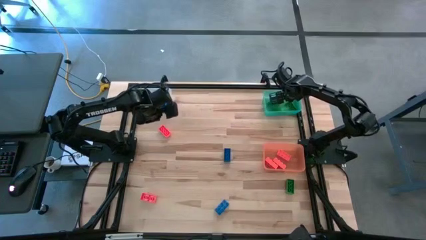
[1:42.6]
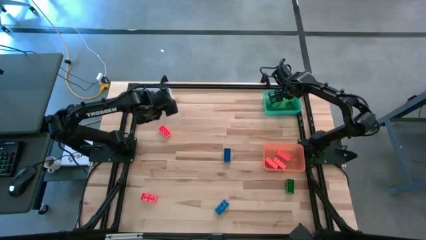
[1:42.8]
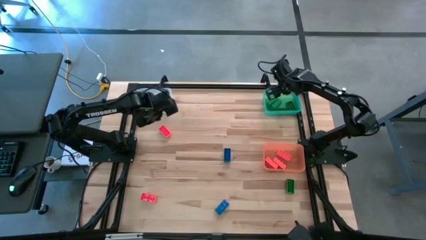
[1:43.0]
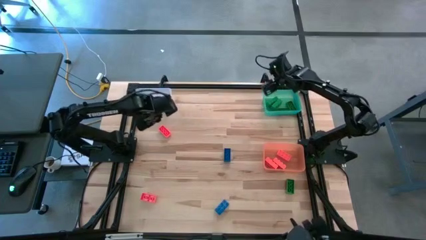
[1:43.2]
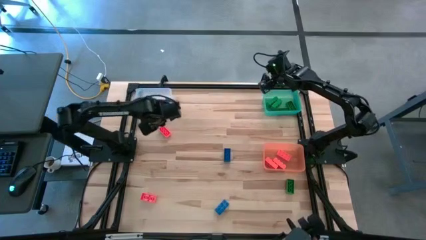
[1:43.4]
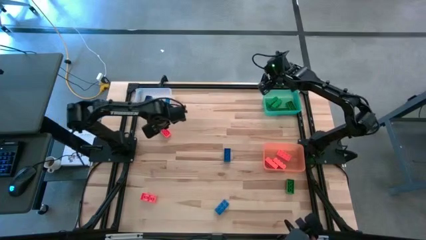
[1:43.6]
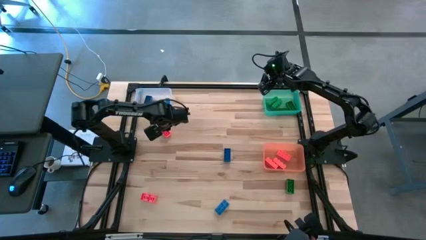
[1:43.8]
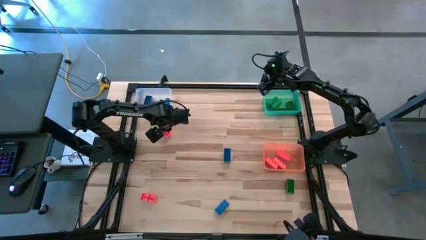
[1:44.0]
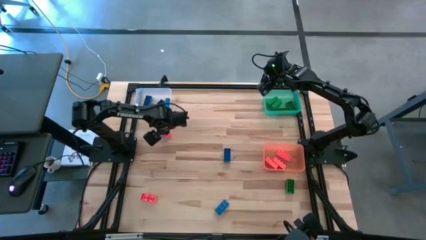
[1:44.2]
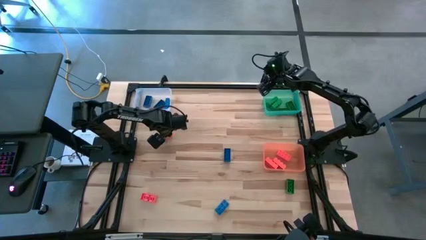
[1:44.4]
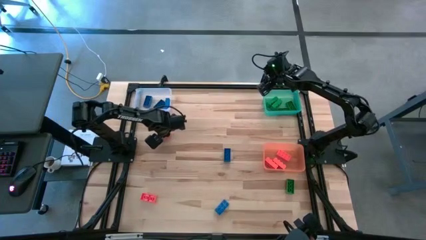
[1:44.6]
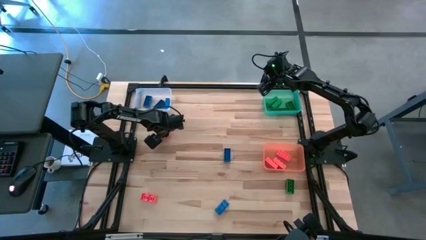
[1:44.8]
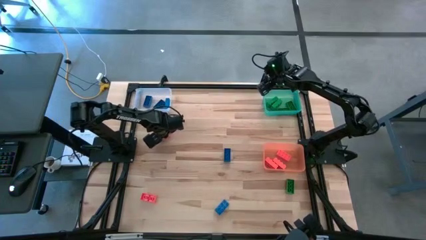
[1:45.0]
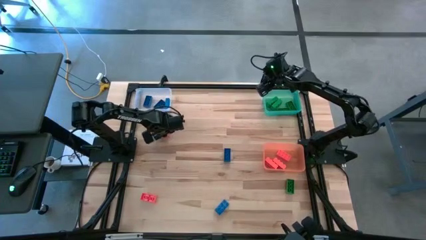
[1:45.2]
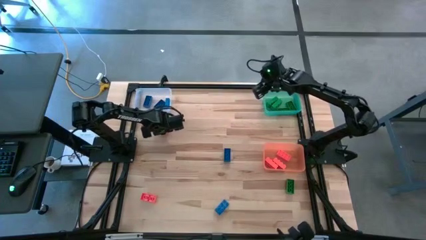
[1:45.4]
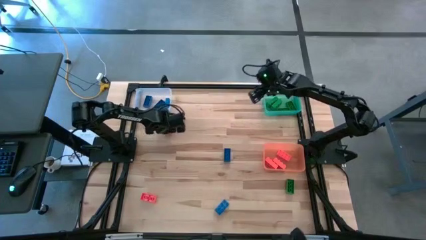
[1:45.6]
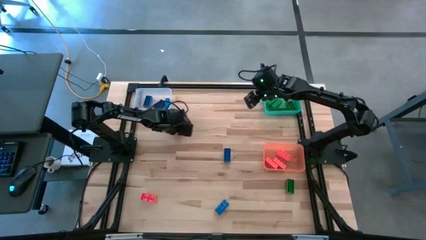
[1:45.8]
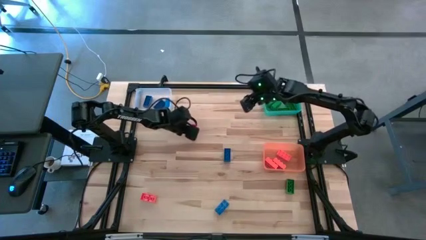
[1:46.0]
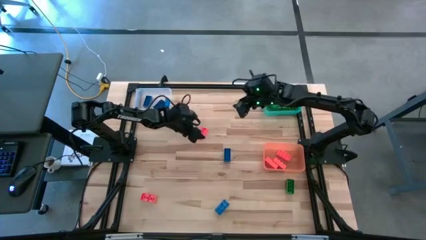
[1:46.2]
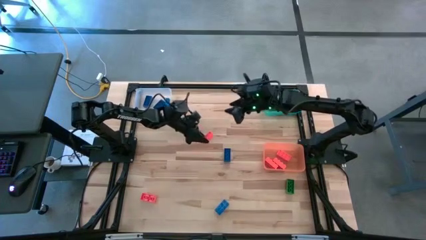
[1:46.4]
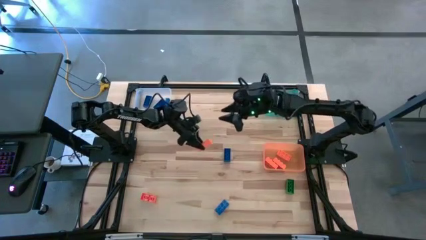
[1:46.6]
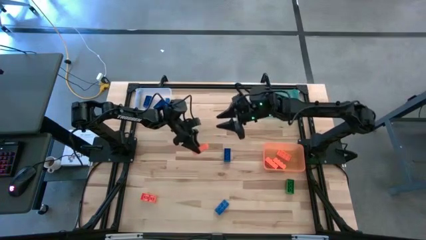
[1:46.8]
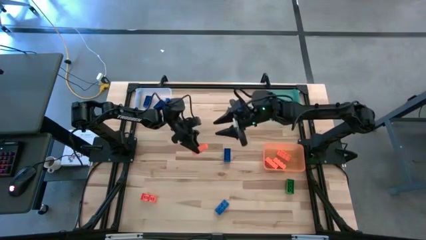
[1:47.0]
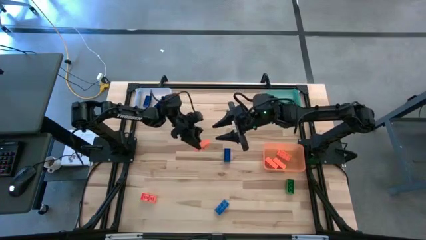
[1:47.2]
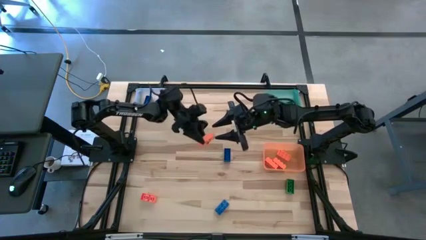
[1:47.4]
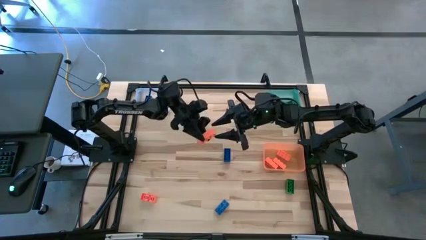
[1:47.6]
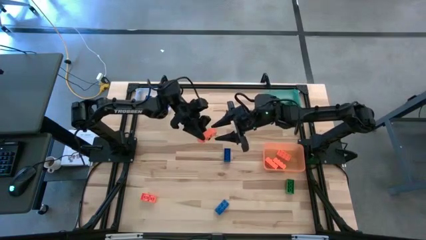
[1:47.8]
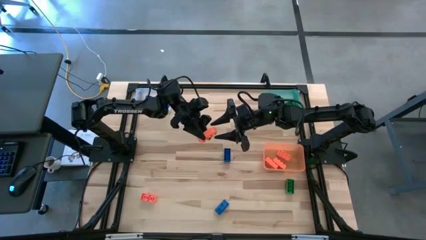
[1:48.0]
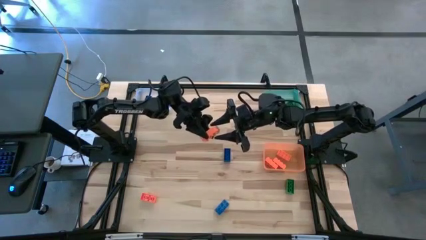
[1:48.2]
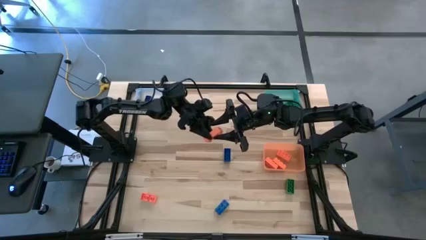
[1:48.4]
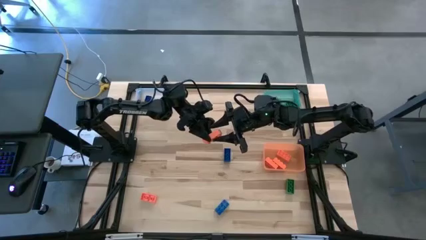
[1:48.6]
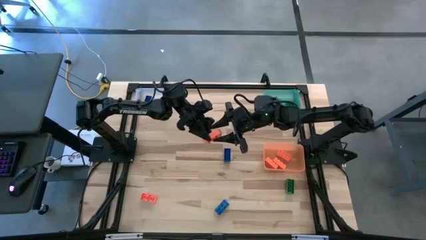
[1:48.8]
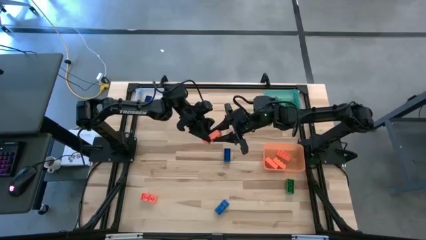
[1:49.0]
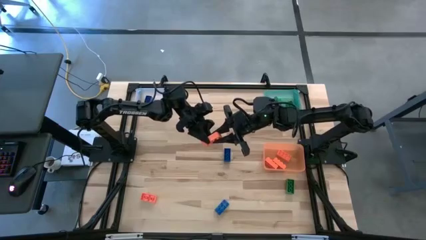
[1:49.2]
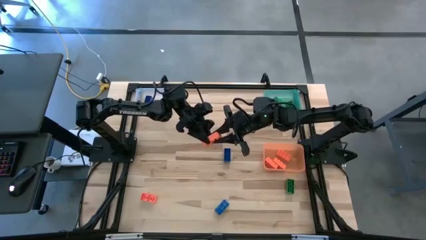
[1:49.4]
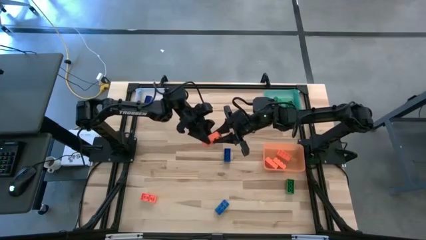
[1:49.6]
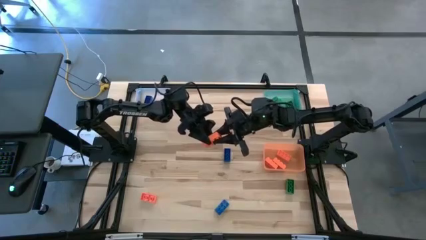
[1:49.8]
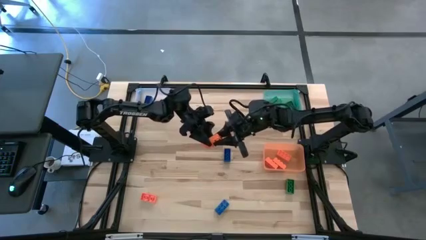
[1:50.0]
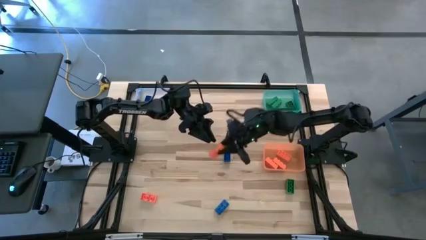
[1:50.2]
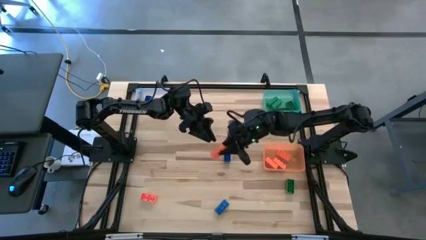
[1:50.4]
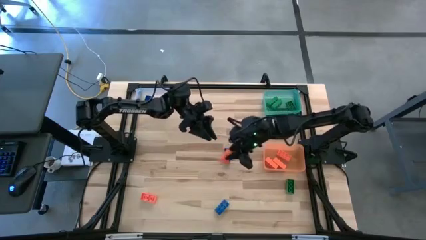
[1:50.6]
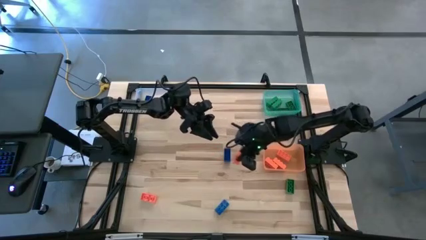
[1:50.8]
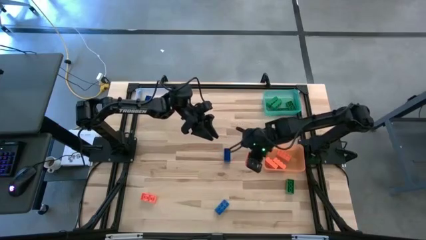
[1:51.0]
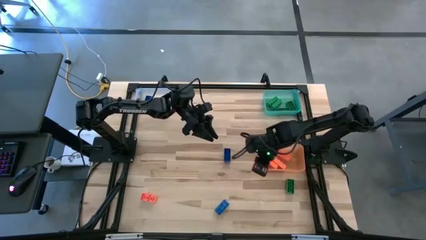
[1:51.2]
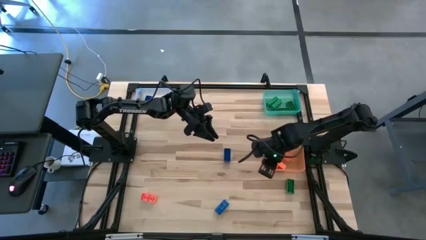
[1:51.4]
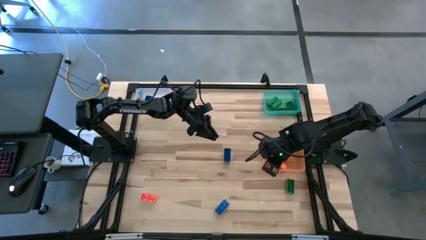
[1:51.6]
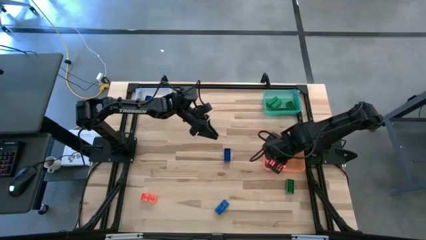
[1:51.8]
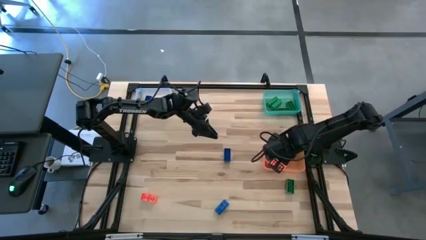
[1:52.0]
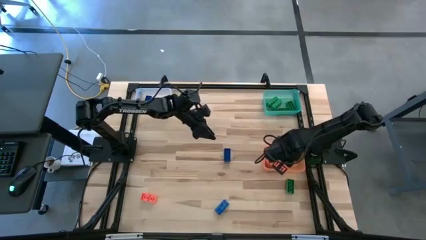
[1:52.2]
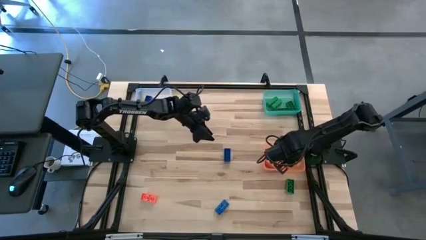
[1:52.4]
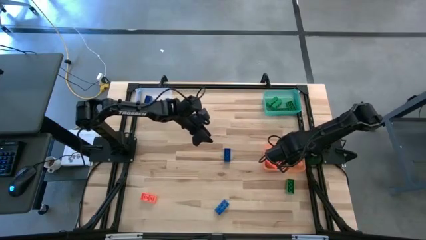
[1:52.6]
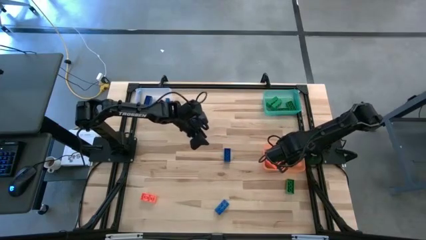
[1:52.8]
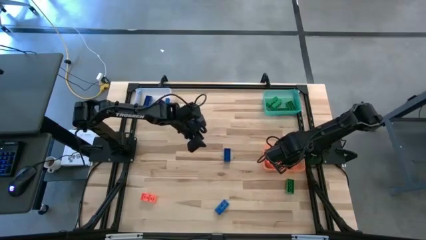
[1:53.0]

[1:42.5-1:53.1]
Task: Sort & place blocks by color
Put the orange game piece into the orange bin

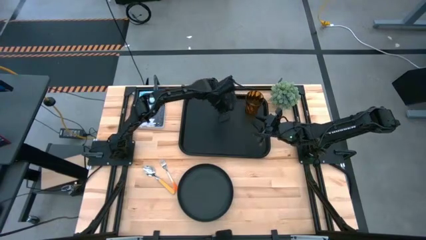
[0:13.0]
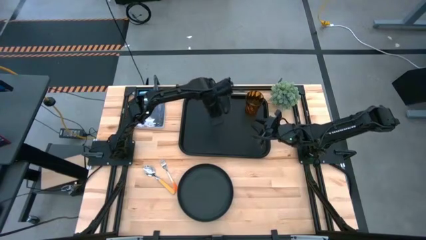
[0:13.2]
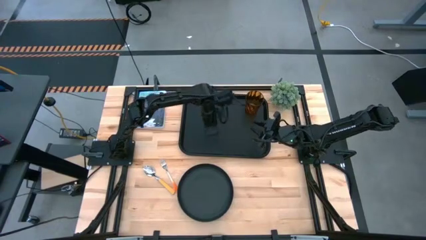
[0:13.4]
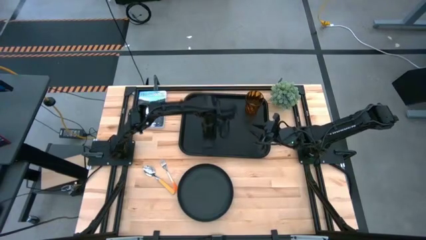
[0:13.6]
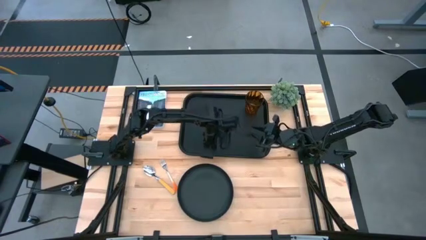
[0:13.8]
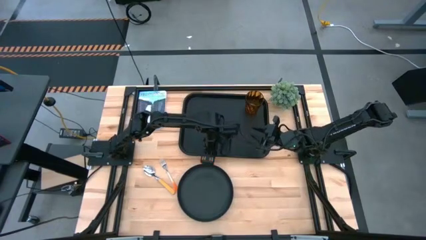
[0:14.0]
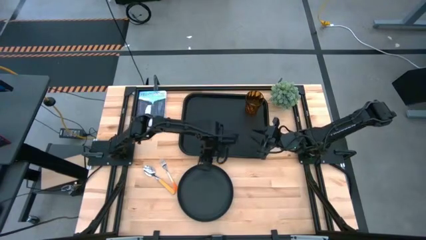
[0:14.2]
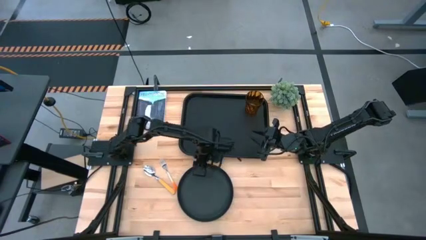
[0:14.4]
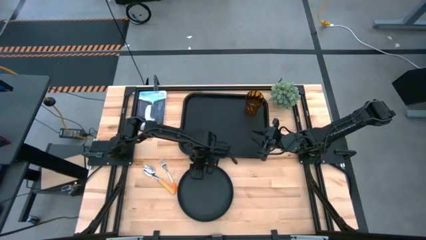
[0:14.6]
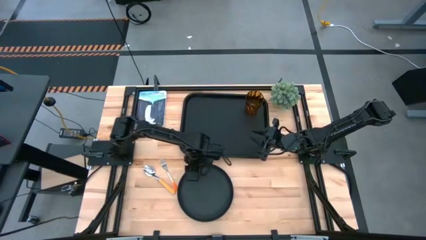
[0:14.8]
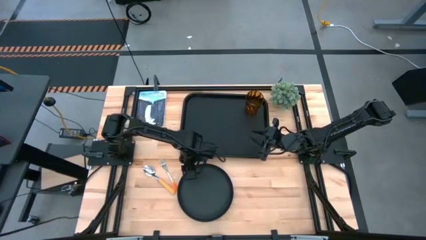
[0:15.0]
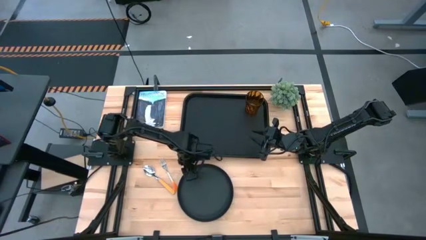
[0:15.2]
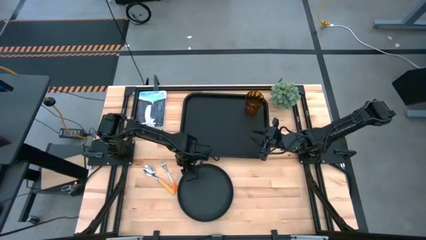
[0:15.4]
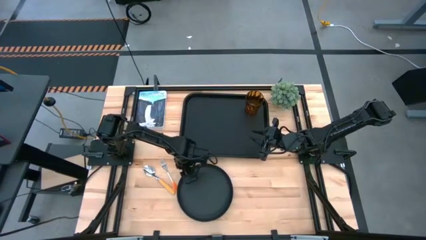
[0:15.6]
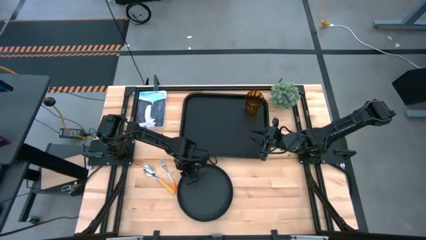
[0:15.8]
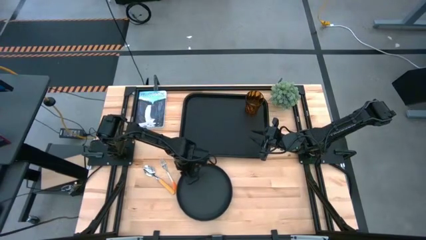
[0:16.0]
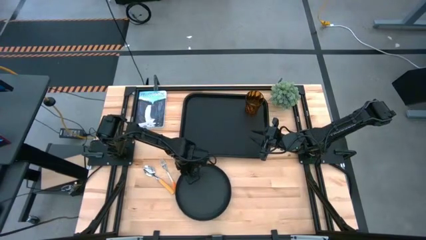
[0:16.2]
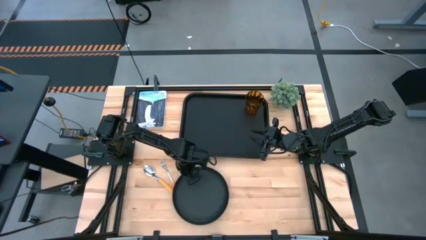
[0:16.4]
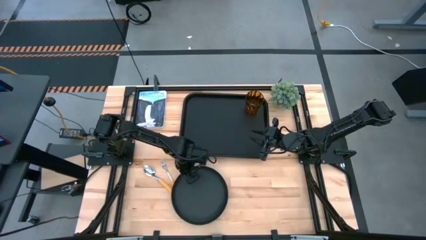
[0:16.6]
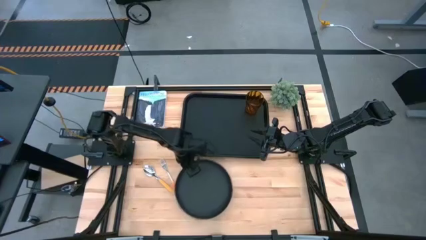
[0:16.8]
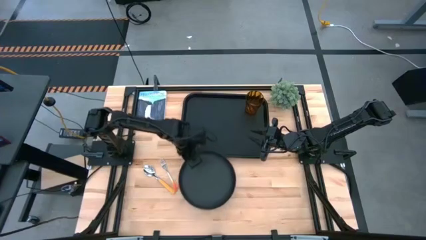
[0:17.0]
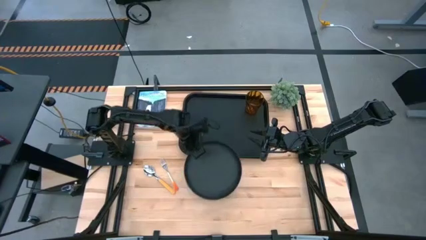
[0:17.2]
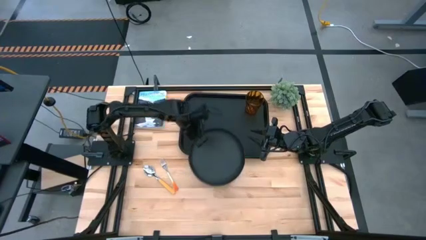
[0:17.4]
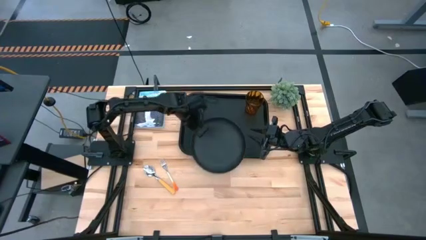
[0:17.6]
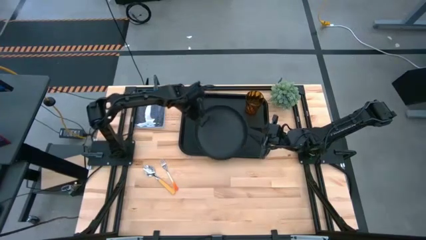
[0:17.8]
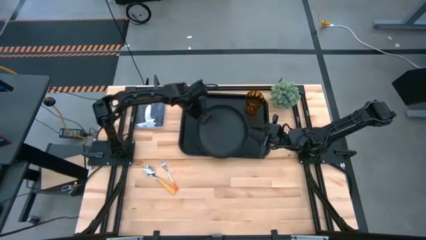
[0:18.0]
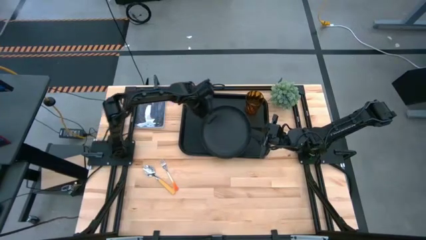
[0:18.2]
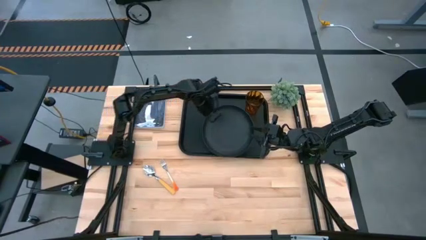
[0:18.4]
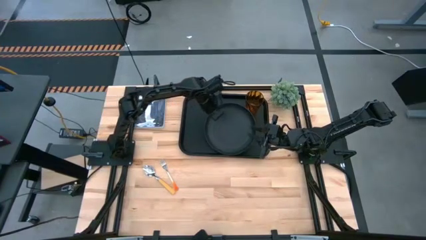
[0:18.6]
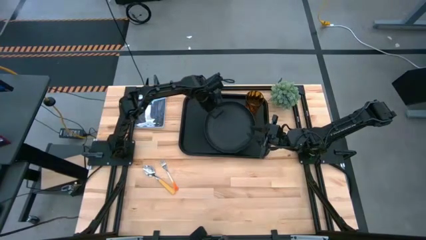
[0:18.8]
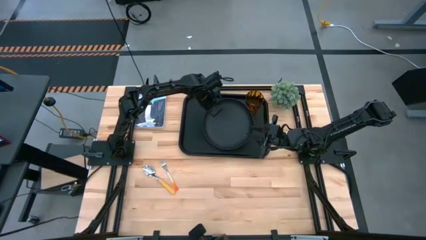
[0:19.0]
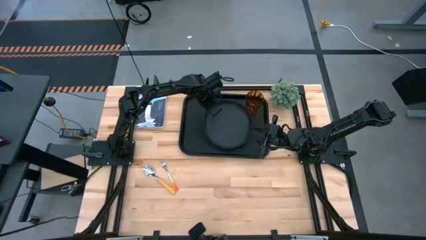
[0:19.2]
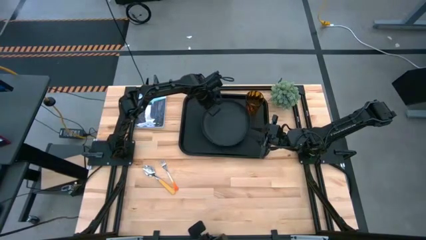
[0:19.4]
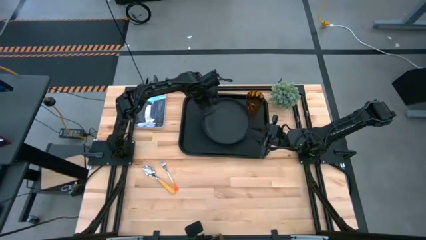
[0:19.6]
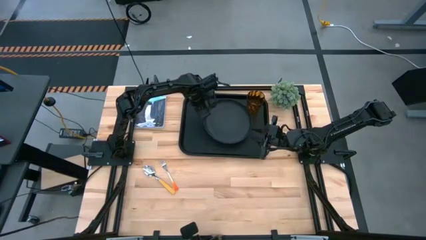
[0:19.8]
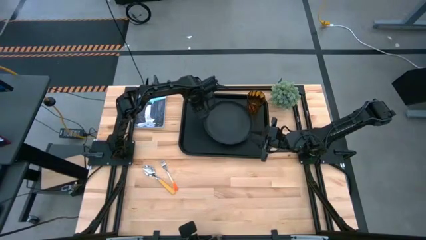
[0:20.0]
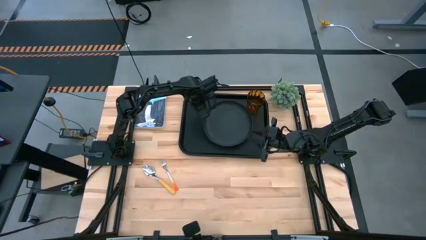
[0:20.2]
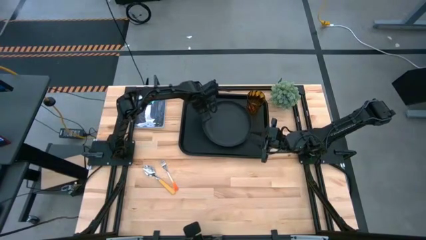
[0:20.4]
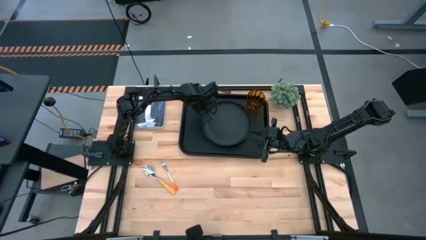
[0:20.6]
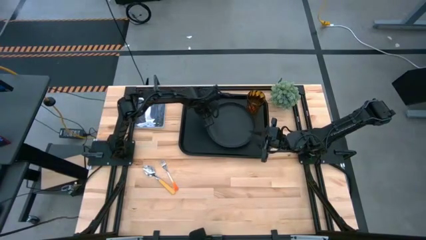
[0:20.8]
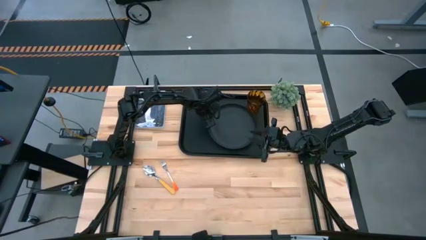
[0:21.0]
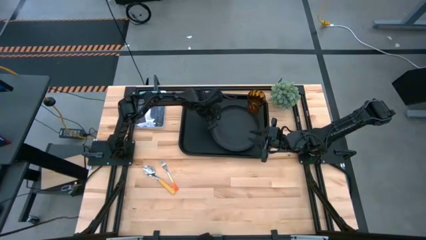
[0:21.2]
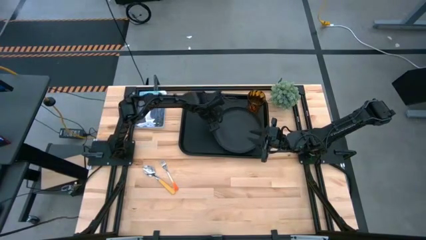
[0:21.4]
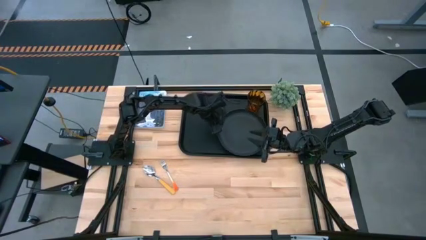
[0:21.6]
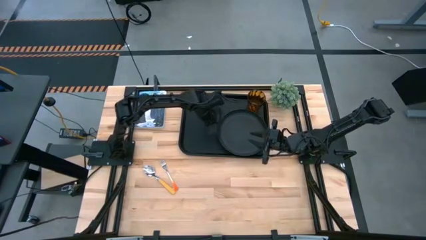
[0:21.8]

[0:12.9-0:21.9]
Task: Pick and place plate/cup/fork/spoon on tray
Put the black plate on the black tray
